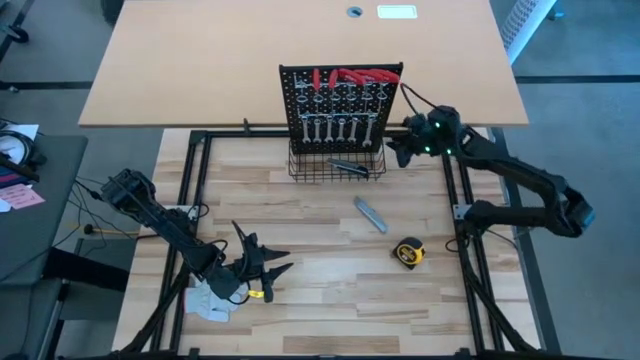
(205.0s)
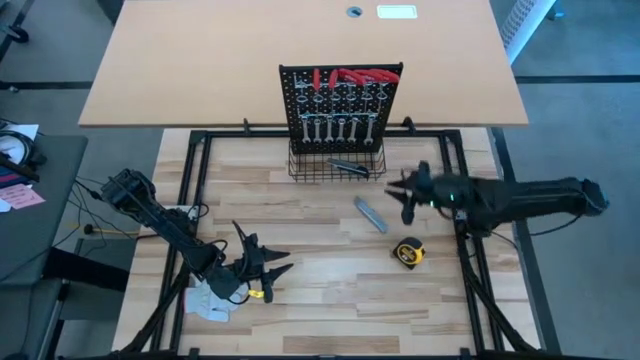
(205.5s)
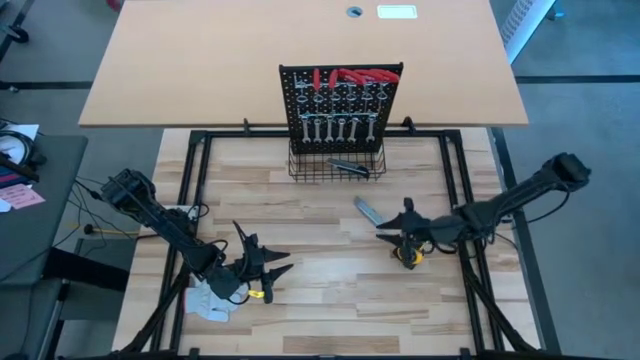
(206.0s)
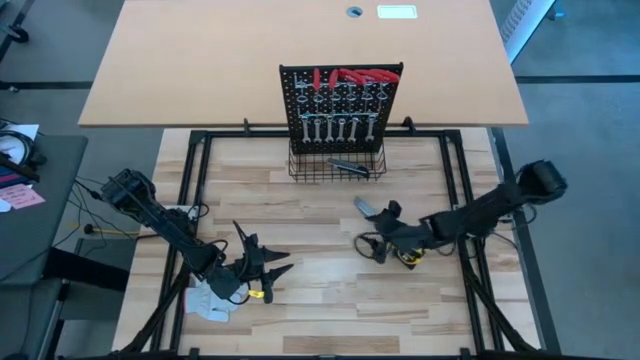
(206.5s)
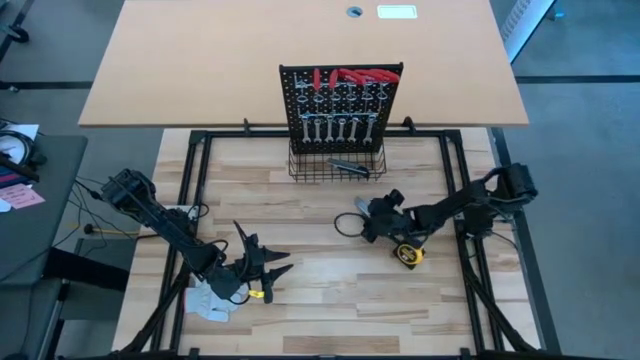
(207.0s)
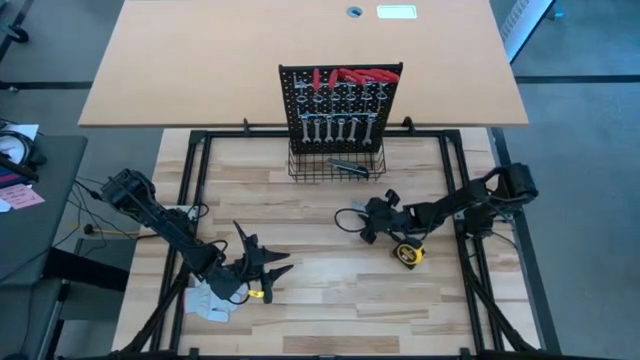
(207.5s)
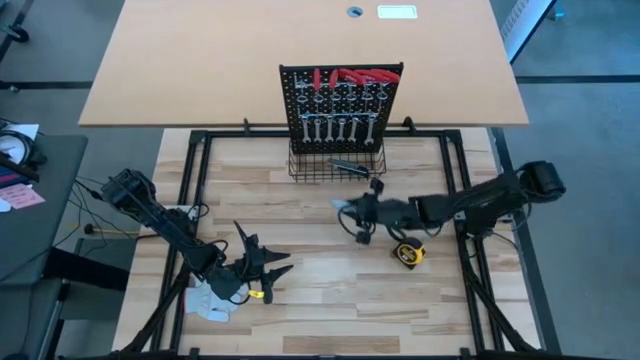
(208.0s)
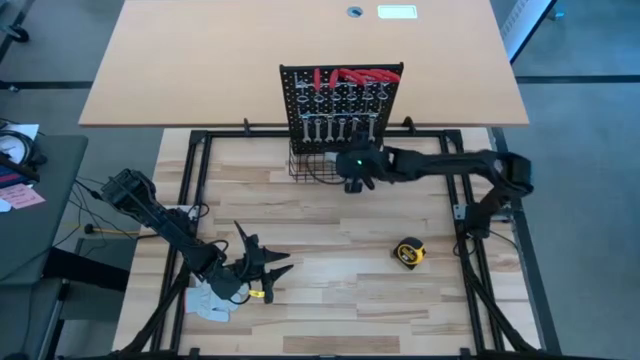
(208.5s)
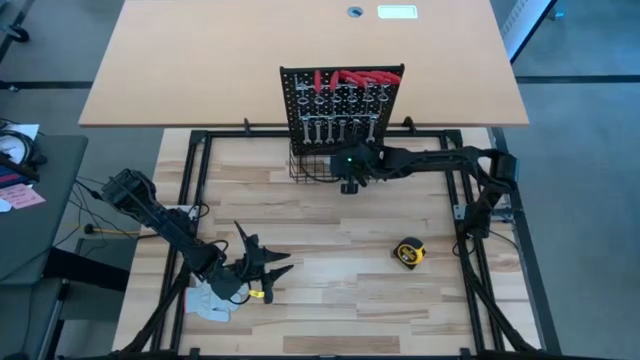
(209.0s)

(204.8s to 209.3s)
Task: Hang tools onto peg board
Put the grey box cutter on the wire basket on the pegboard

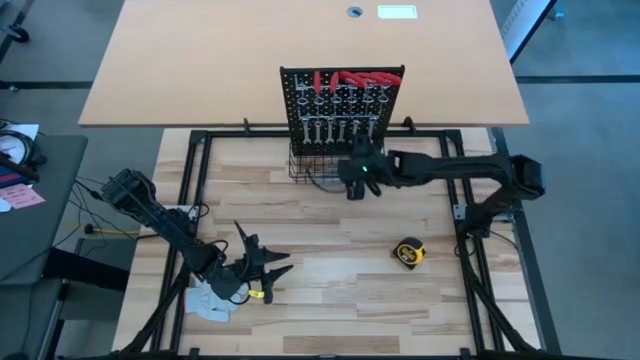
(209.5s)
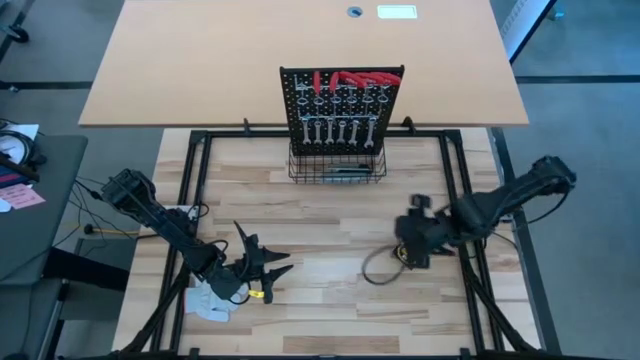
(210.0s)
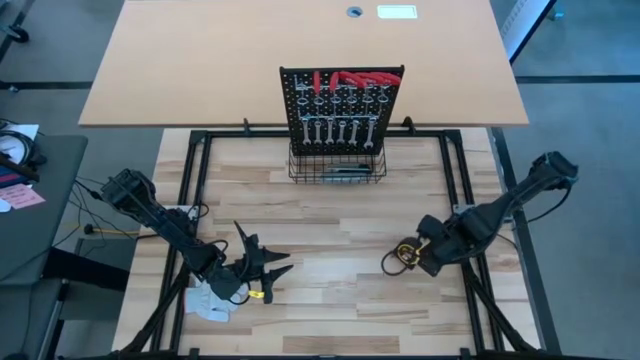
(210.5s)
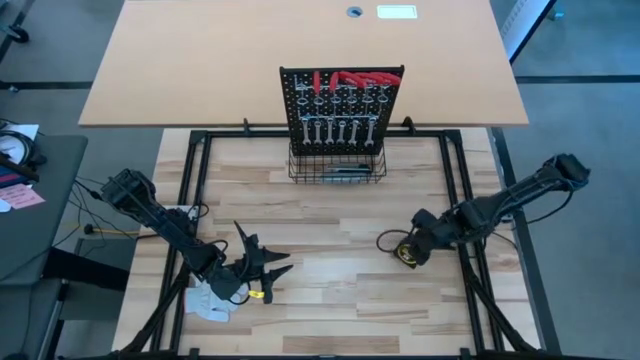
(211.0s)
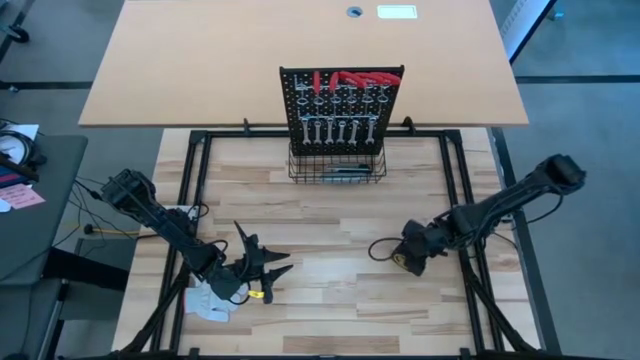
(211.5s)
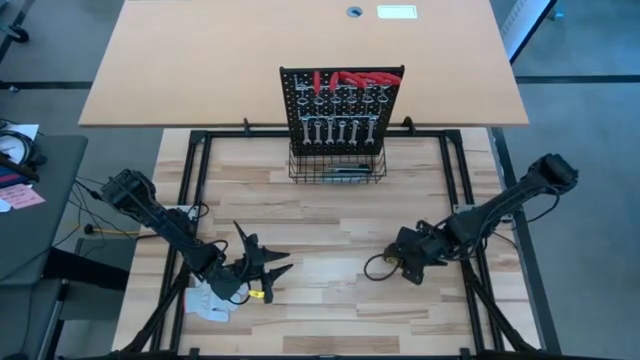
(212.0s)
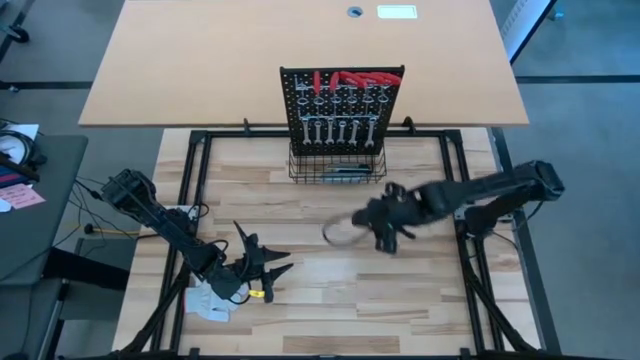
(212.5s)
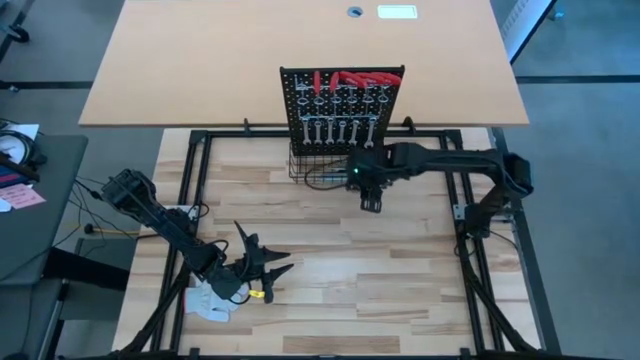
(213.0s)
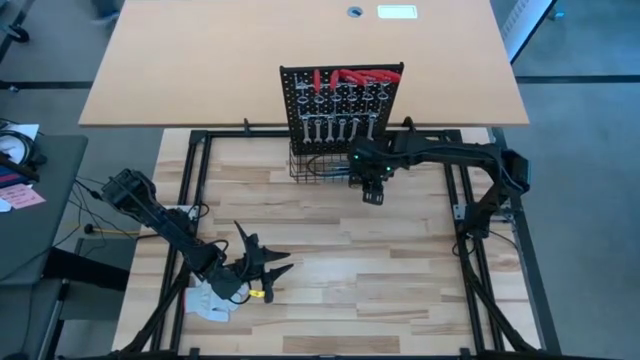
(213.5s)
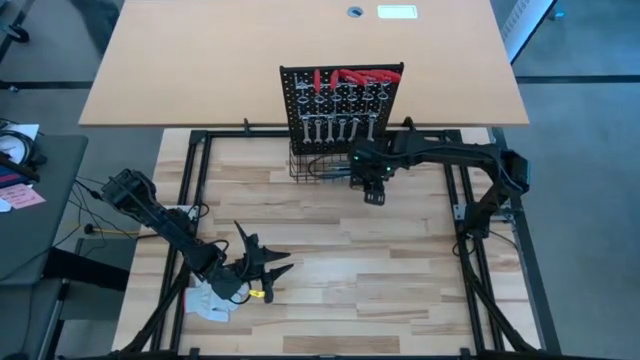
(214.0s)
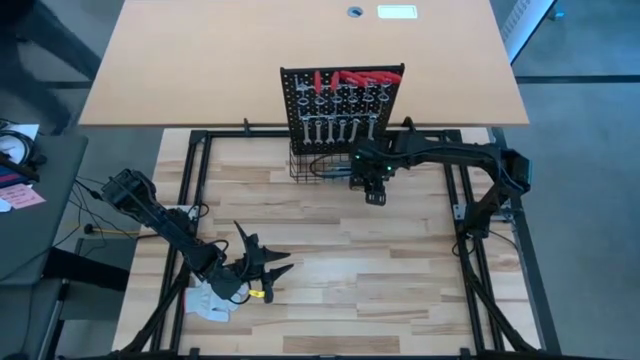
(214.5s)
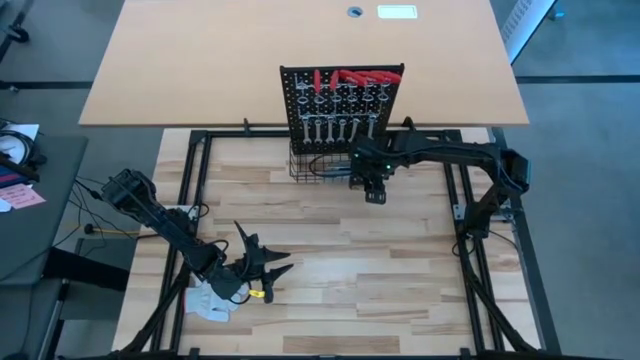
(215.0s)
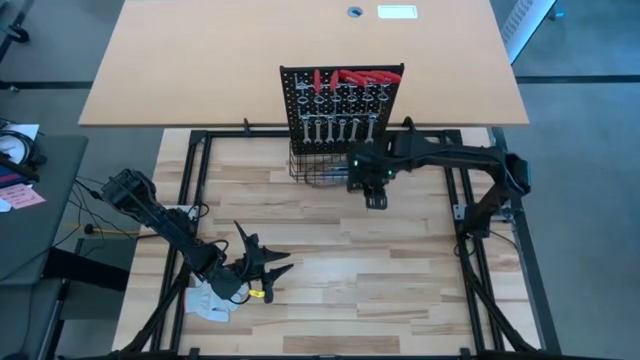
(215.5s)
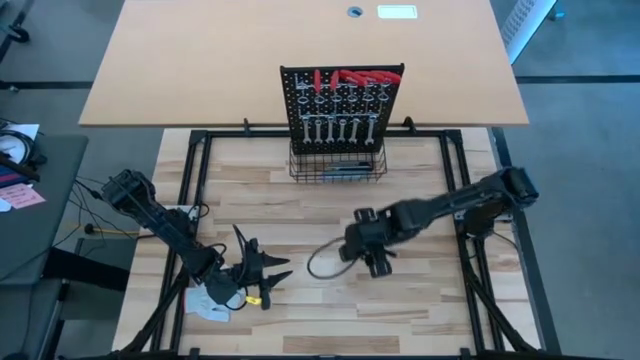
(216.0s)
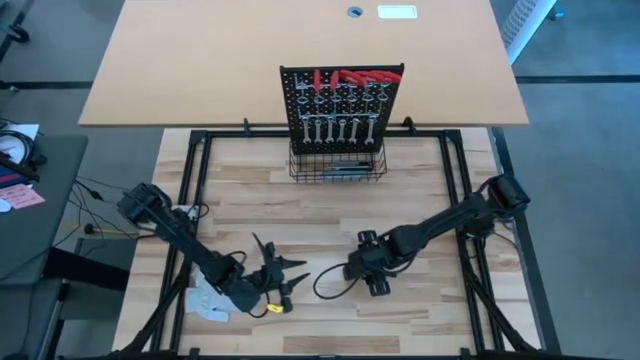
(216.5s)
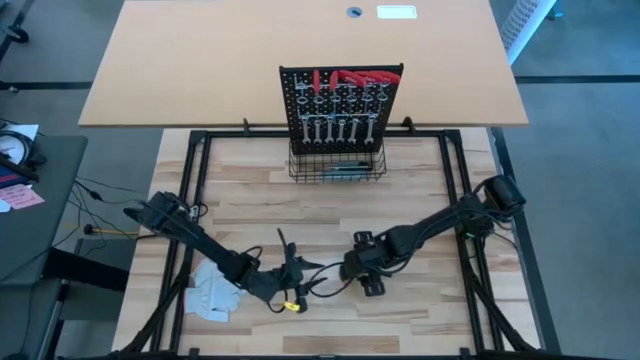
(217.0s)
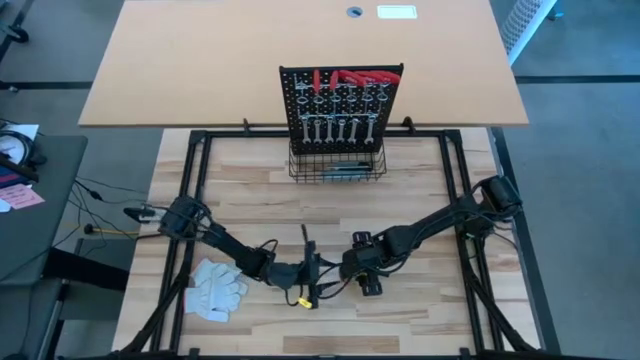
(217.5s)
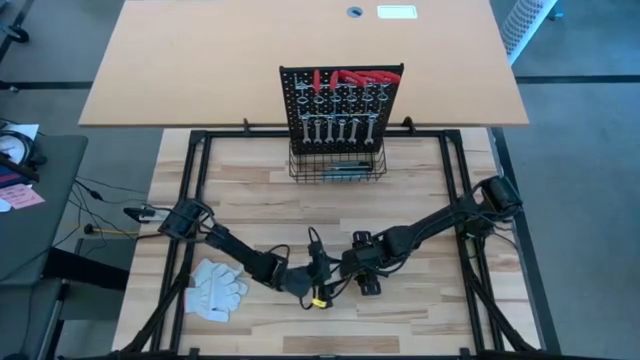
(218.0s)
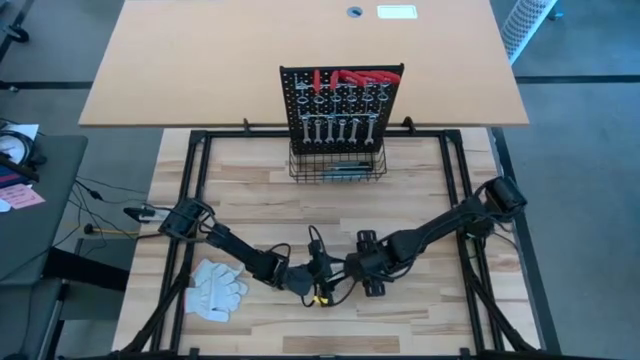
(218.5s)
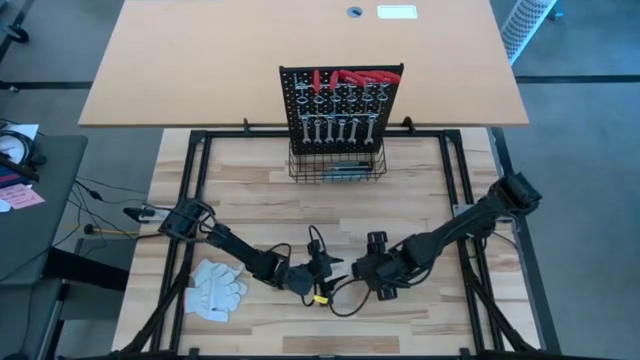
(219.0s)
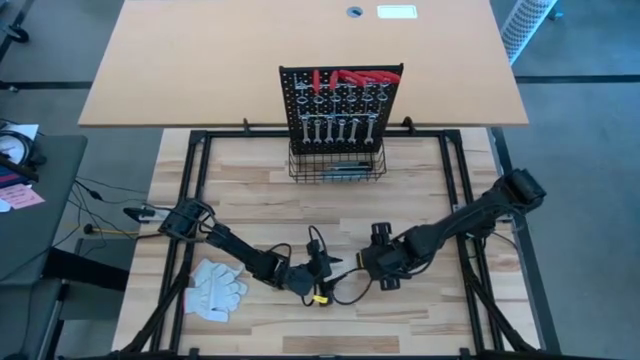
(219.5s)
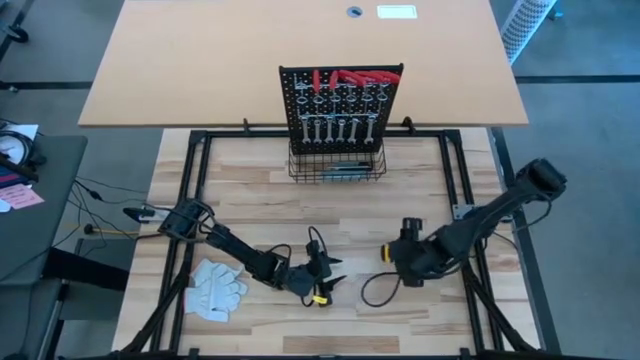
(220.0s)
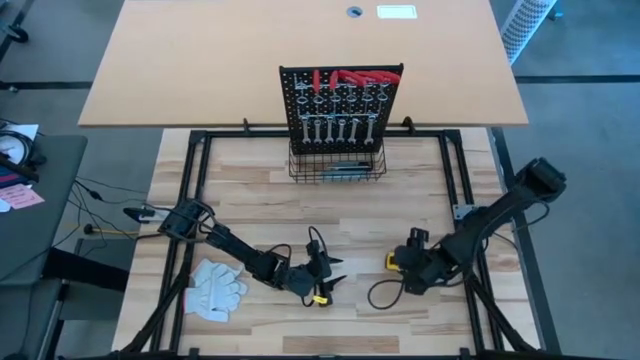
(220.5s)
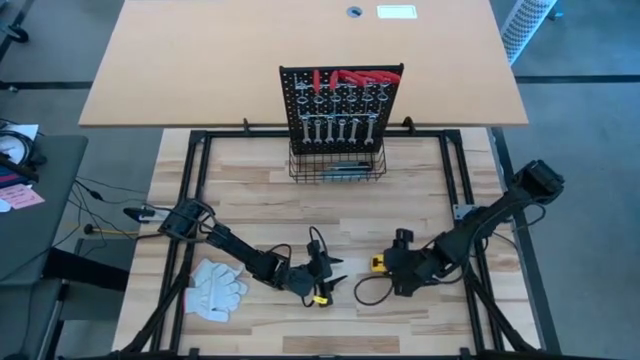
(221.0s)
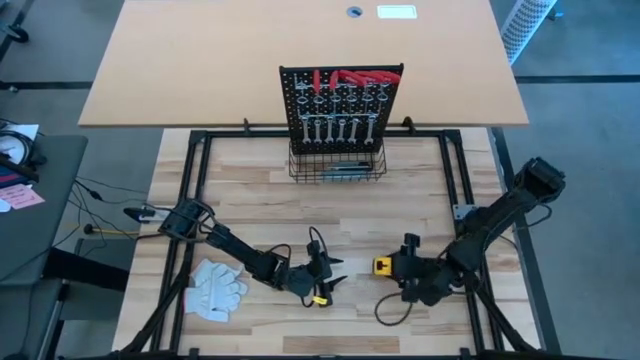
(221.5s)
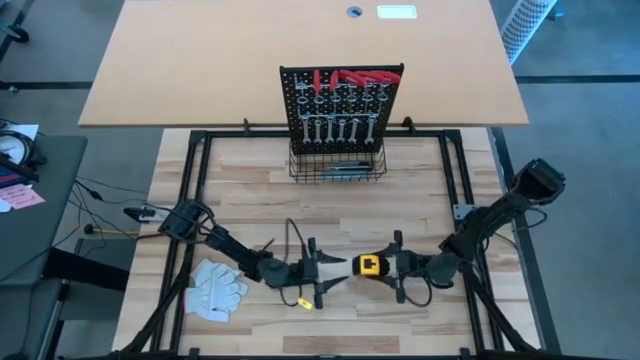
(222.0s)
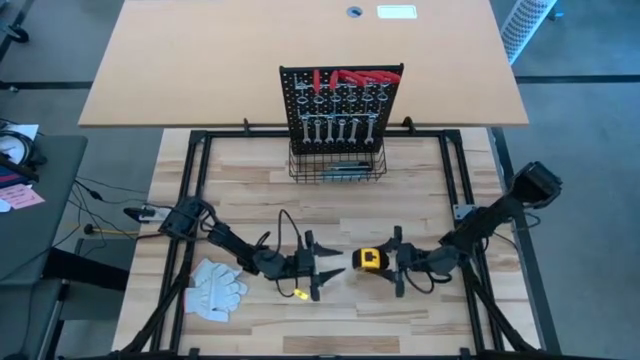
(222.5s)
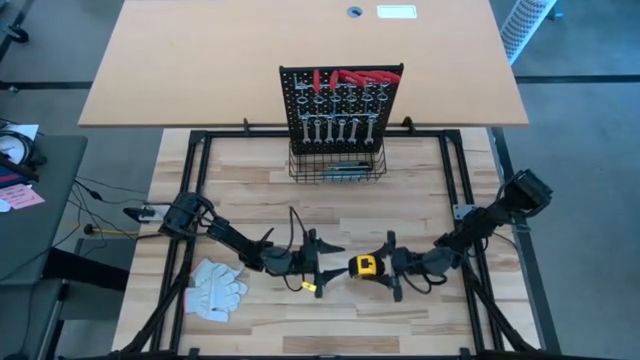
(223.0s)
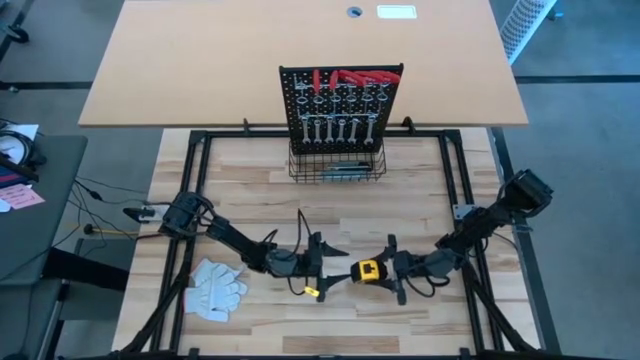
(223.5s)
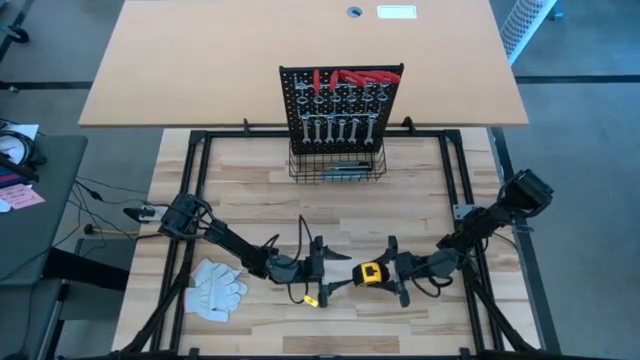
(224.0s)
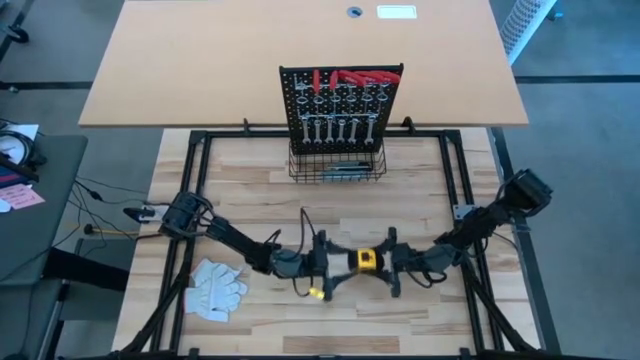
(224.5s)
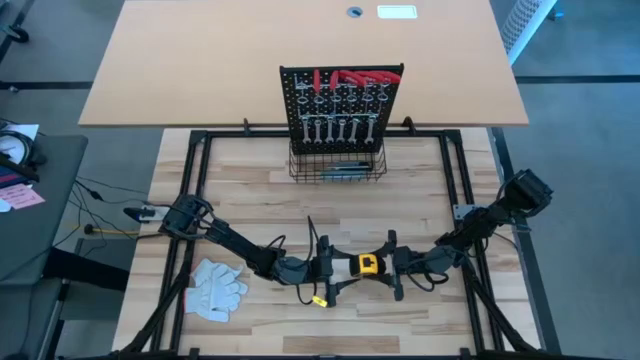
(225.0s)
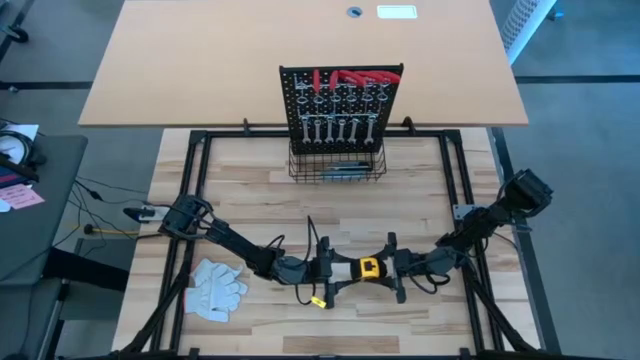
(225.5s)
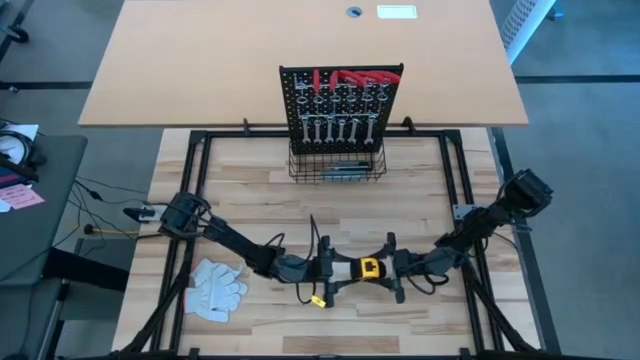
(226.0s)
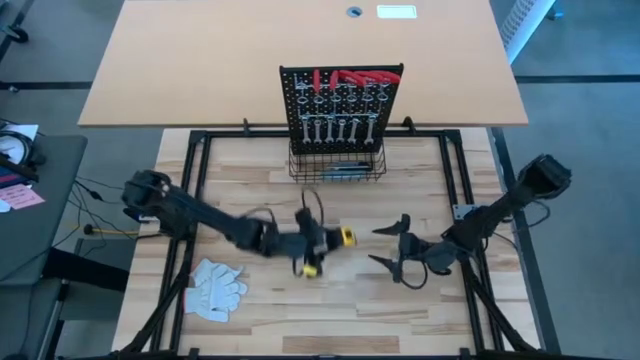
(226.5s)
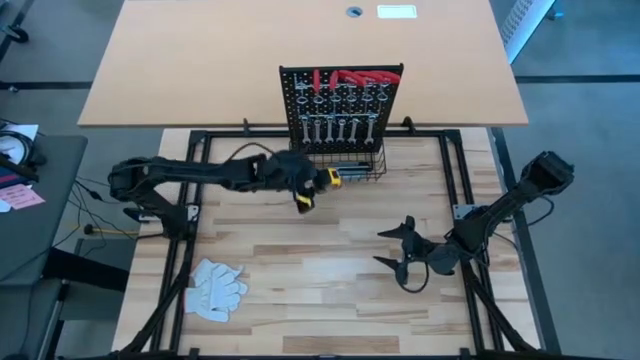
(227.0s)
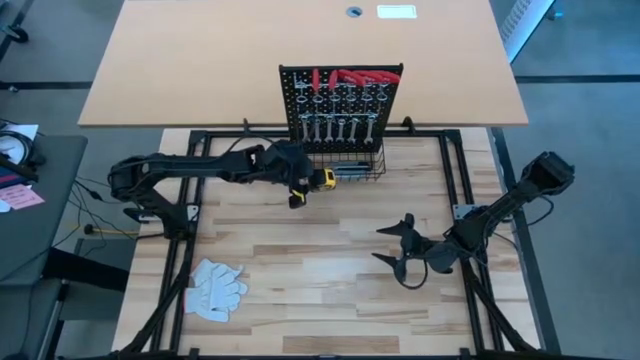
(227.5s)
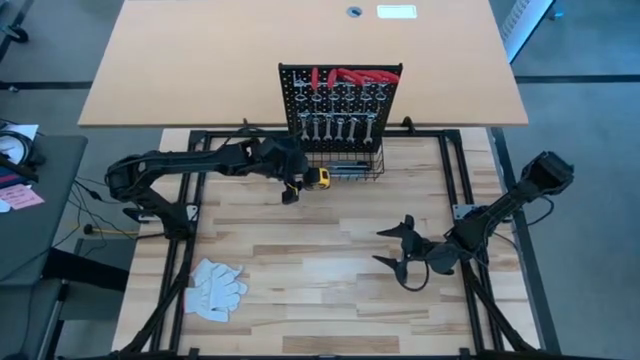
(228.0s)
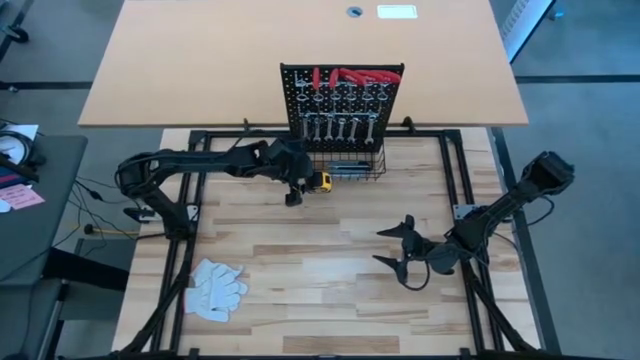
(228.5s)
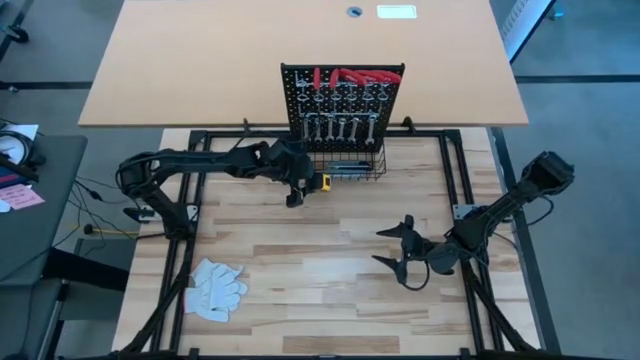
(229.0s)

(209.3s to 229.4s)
Put the yellow steel tape on the wire basket on the pegboard
